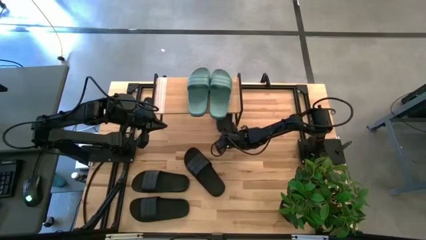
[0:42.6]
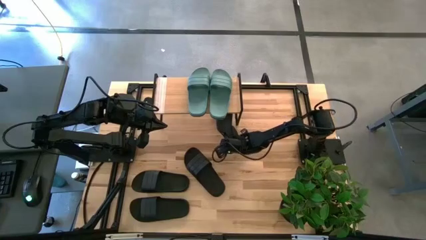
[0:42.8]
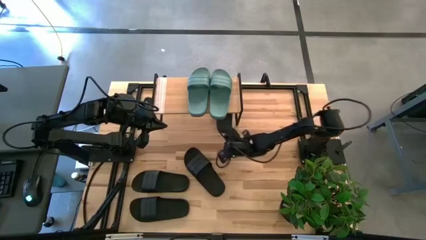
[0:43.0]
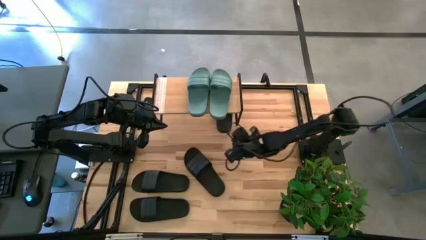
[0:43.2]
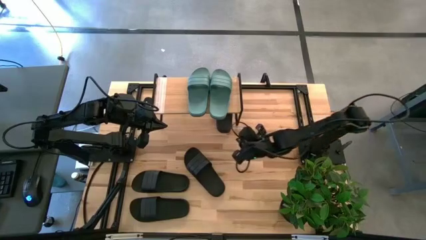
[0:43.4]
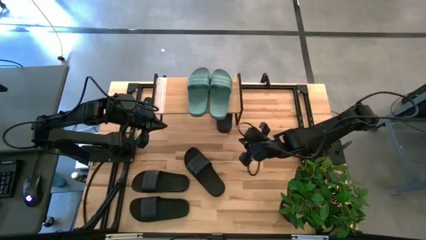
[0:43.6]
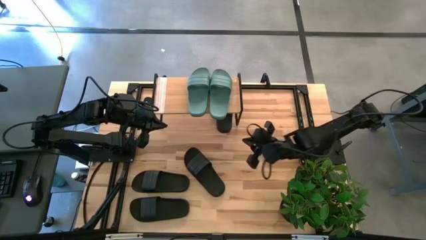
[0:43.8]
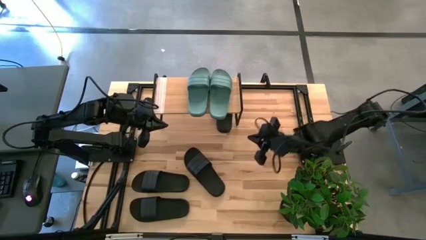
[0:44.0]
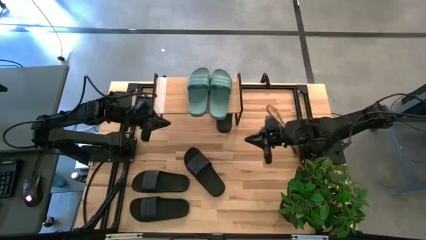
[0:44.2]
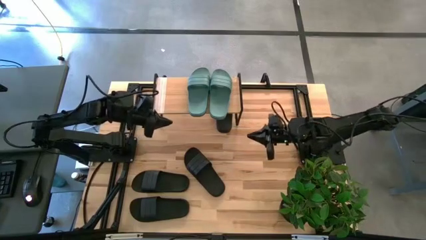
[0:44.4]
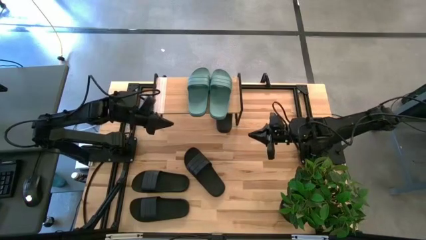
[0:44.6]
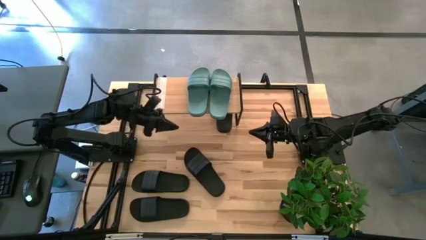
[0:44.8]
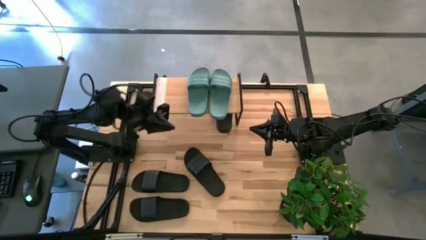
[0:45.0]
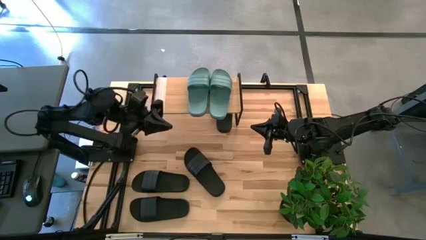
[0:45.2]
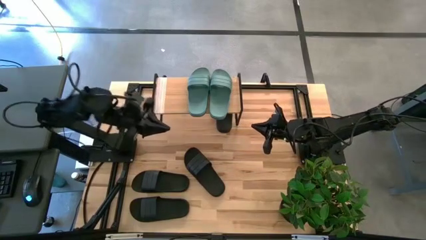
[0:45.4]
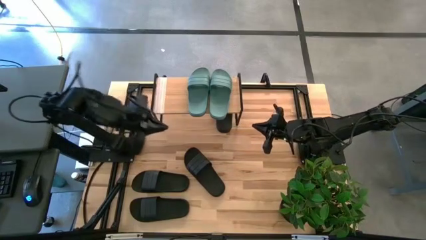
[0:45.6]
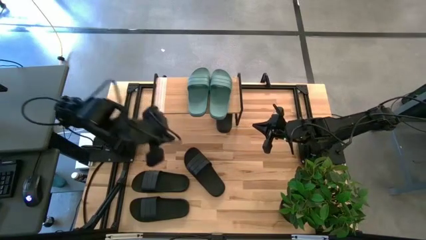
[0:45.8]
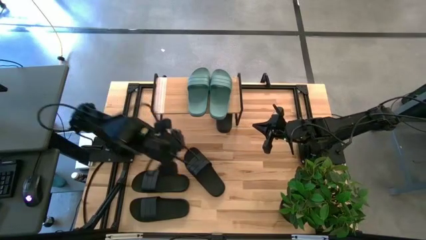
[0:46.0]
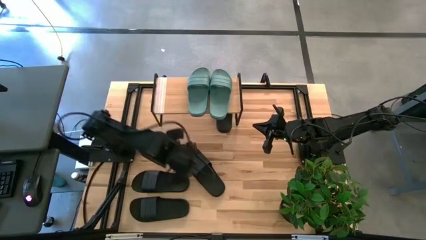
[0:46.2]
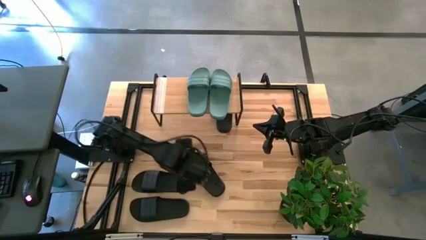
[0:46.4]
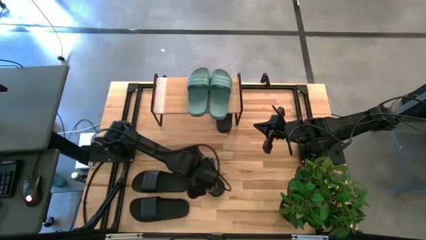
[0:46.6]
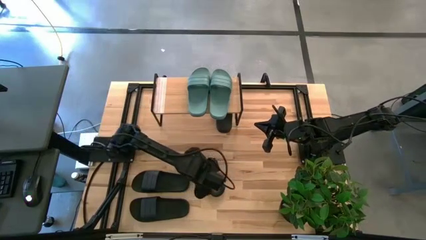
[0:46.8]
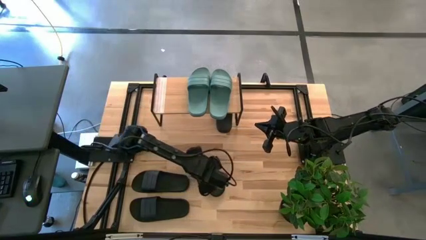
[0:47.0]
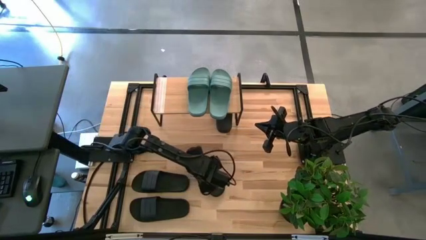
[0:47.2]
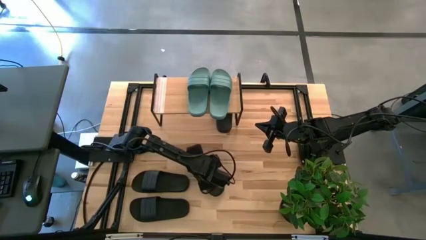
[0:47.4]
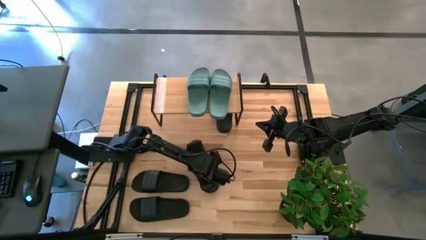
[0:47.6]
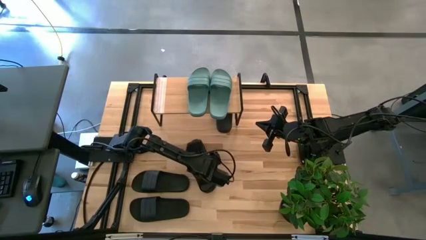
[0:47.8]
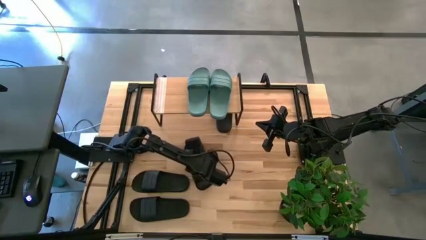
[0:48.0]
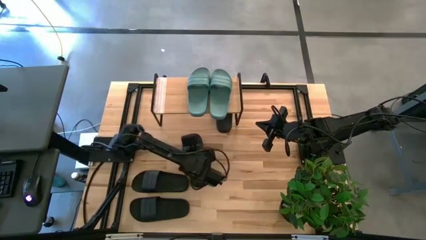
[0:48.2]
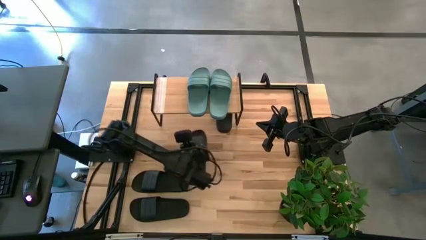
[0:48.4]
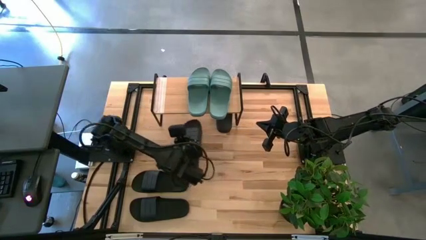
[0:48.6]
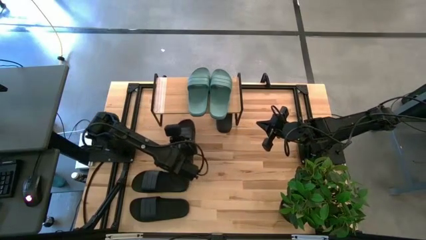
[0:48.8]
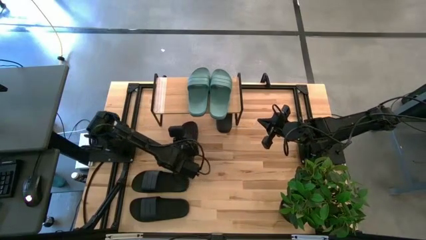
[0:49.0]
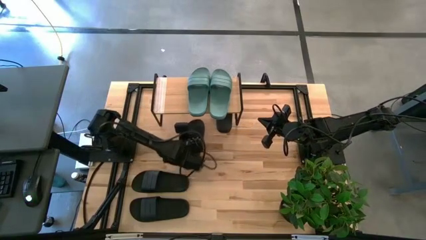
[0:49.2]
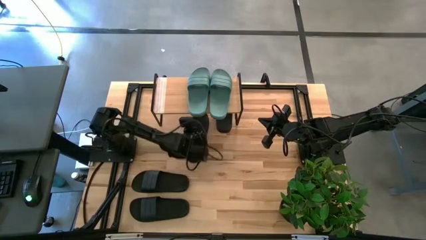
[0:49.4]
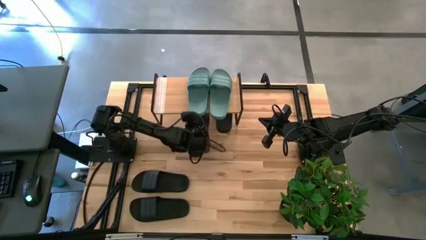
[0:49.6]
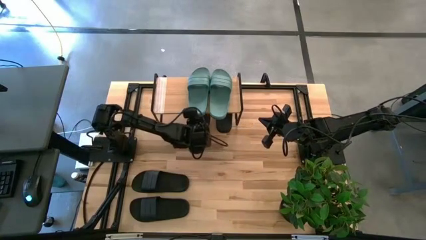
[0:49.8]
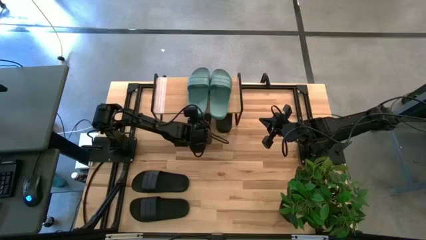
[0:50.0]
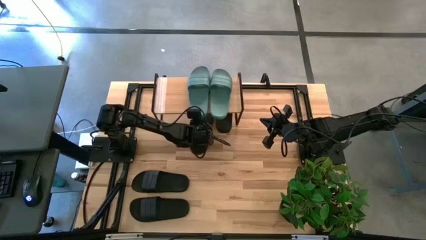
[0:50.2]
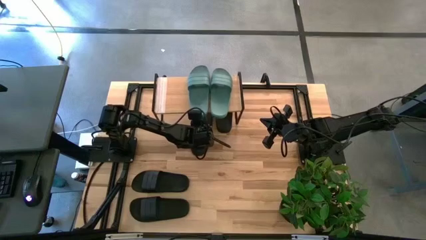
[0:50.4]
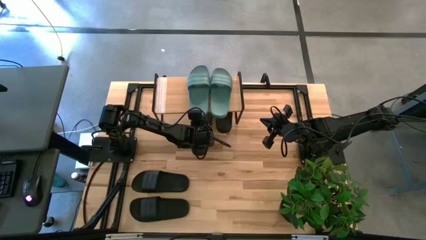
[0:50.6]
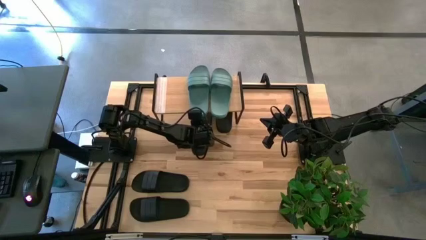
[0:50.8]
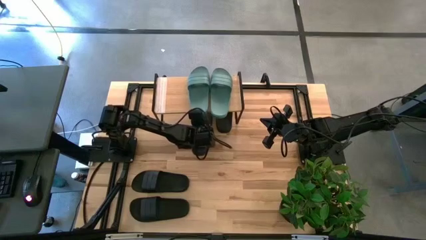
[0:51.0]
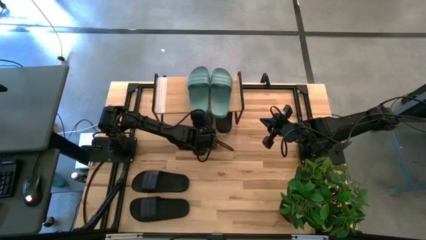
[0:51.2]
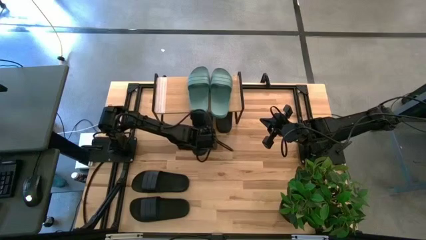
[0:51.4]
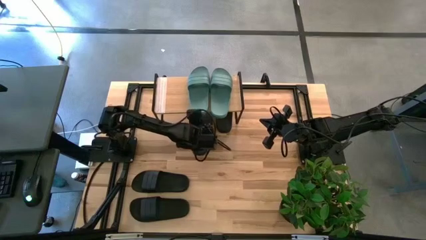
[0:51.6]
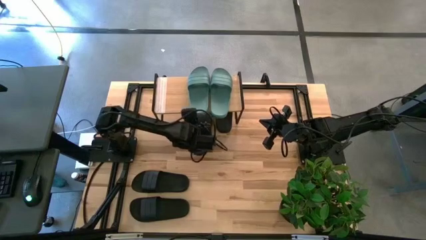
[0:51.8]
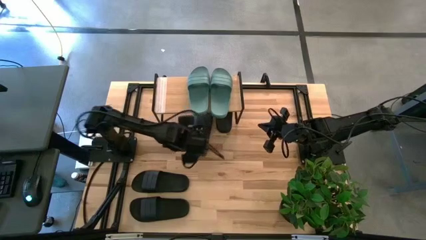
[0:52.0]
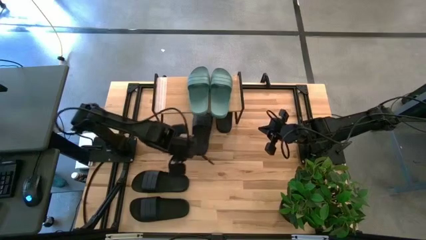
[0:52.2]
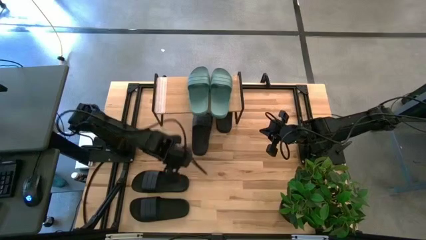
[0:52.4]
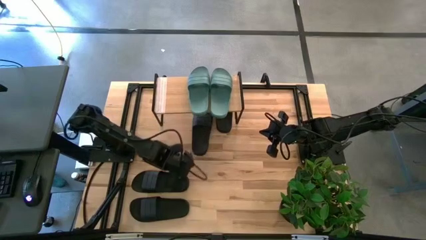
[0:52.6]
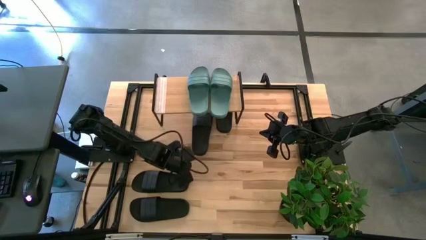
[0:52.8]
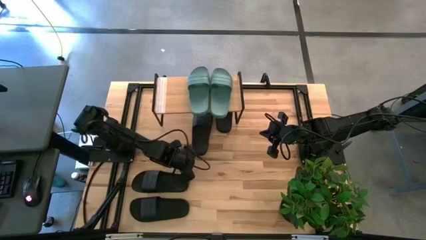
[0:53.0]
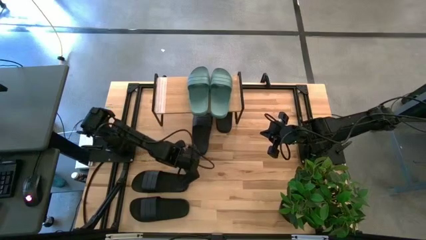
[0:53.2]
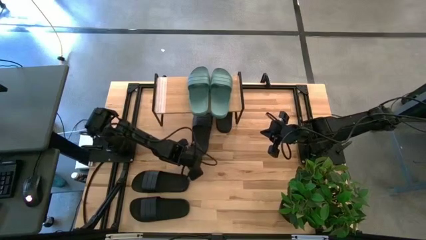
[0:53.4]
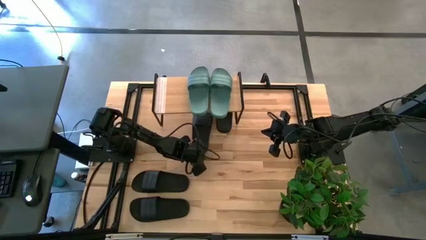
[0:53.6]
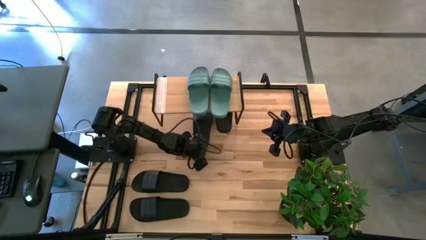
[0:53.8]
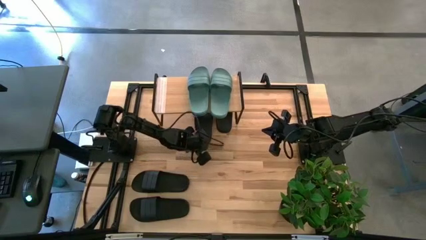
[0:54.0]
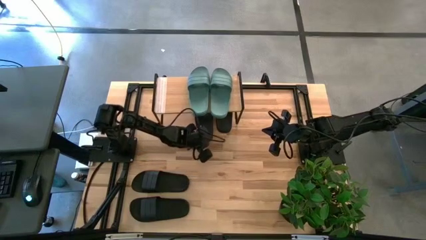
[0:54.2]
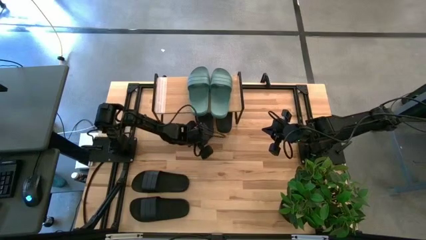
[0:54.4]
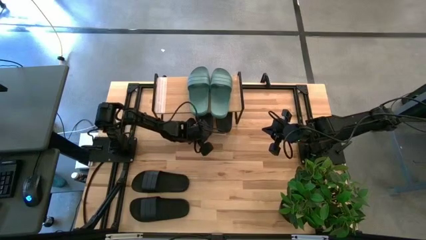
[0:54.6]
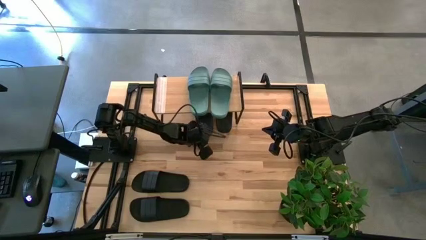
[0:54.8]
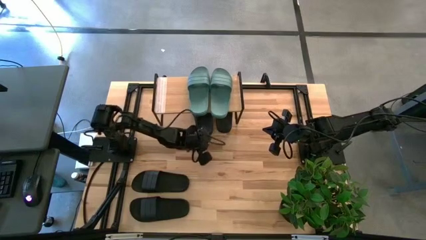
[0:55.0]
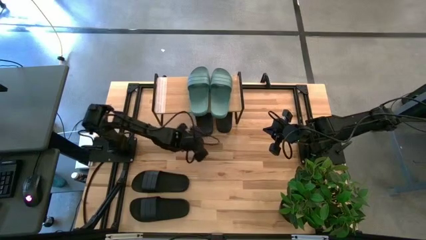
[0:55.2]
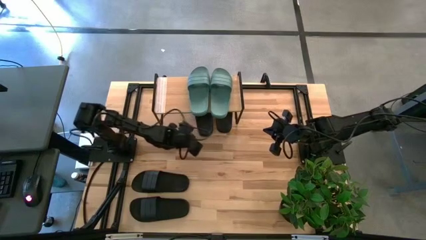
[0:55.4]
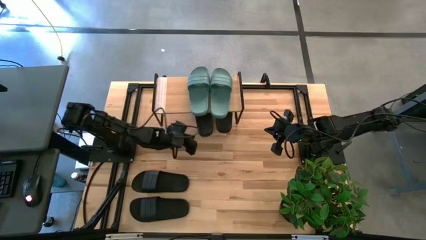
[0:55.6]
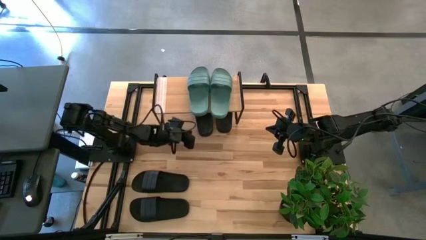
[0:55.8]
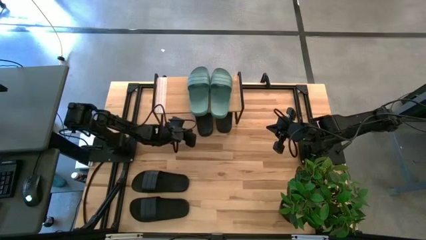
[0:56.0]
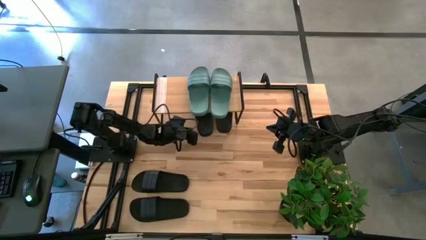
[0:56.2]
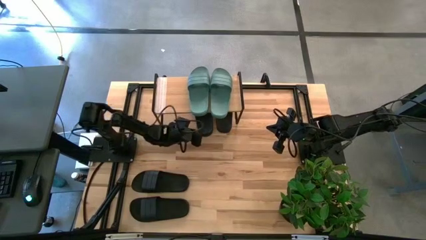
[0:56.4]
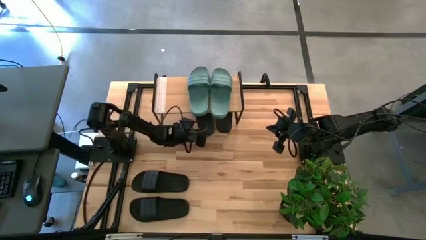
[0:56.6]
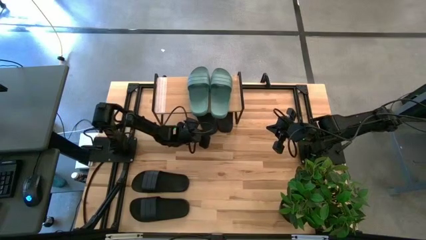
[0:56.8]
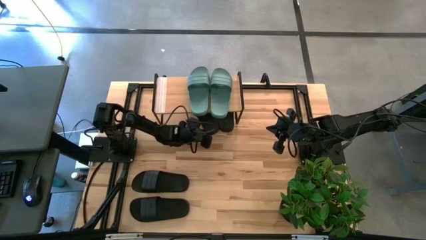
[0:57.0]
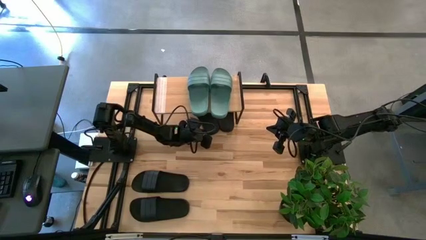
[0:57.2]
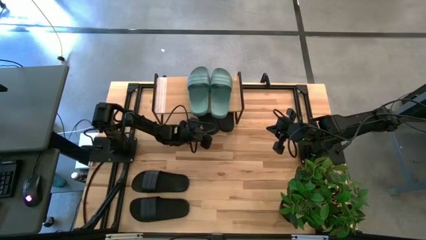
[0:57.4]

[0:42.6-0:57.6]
Task: Pick and place slides into the shelf
Put the black slide under the shelf
